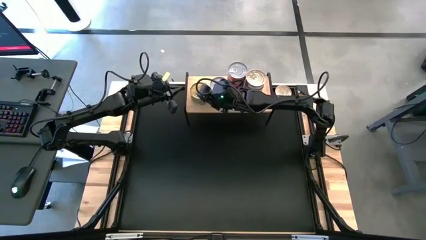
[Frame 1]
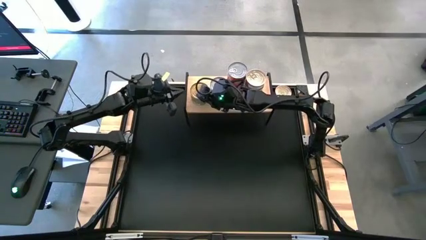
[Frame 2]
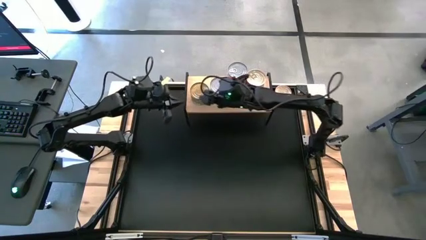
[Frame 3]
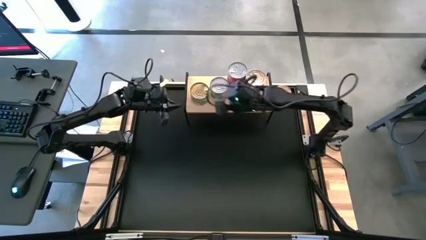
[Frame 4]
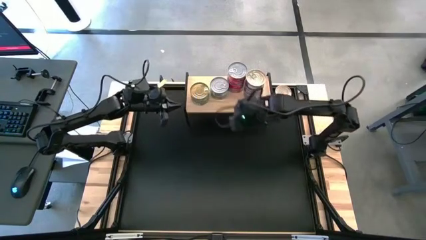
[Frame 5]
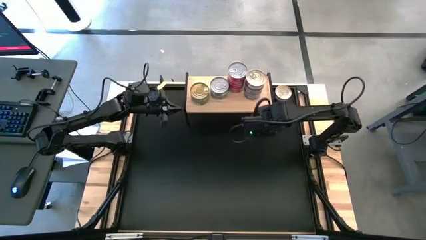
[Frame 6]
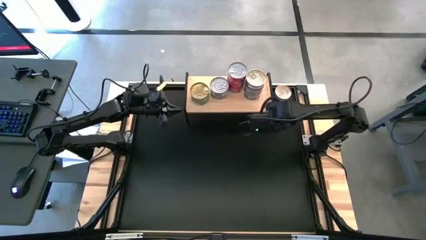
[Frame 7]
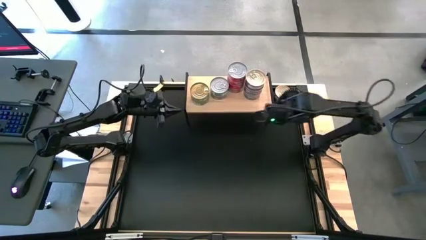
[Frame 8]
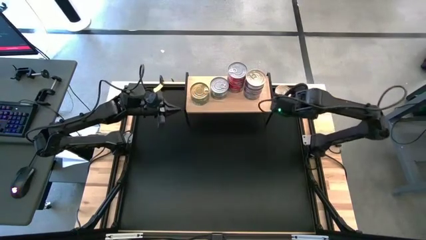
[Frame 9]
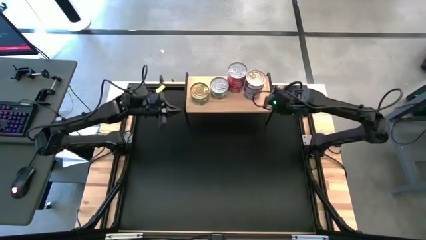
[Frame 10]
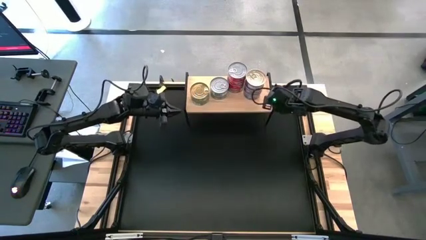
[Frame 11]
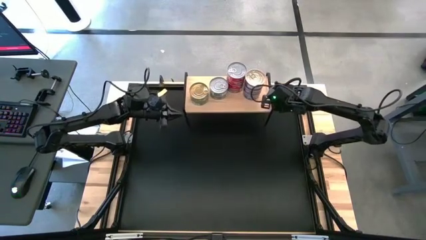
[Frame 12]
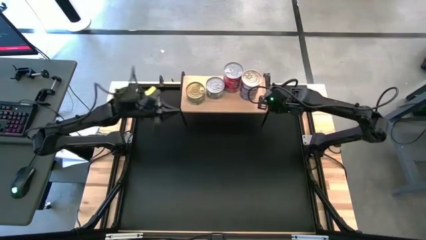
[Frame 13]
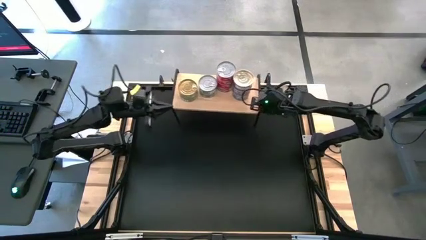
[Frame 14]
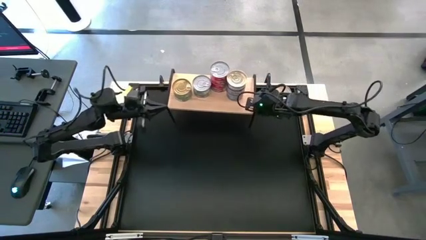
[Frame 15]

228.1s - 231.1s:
Task: Stack canned seafood by type on shelf
Adjust the shelf

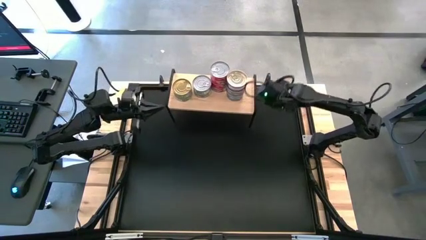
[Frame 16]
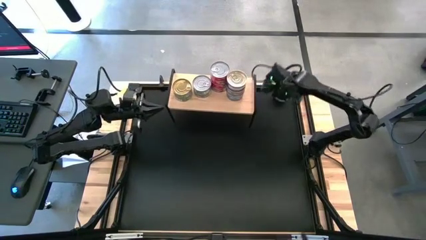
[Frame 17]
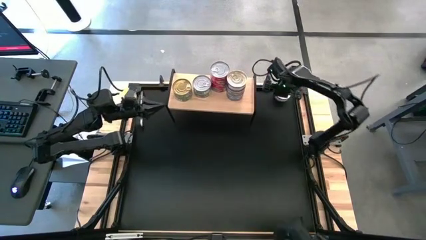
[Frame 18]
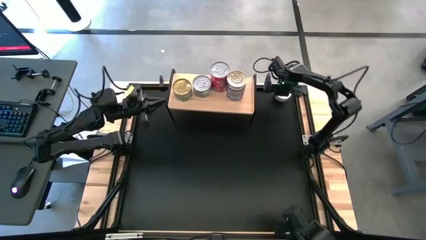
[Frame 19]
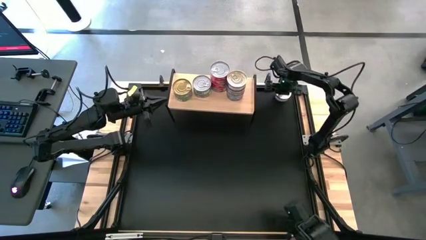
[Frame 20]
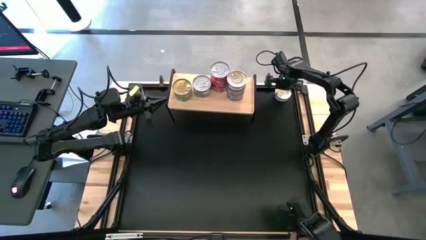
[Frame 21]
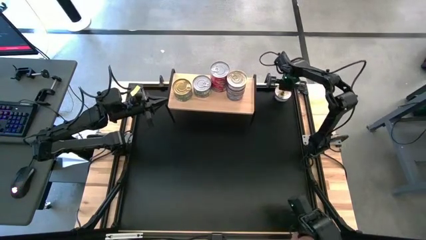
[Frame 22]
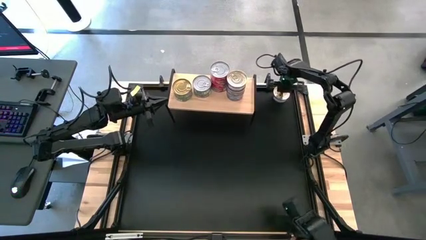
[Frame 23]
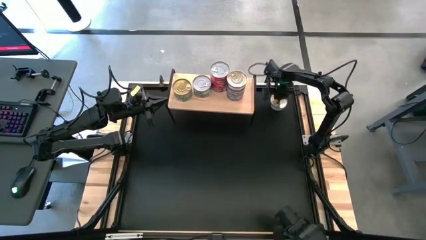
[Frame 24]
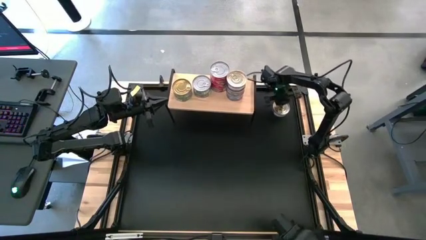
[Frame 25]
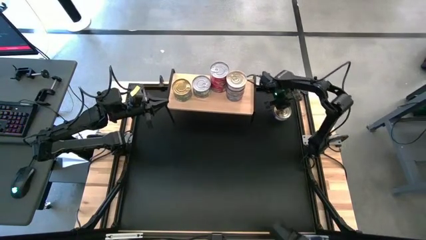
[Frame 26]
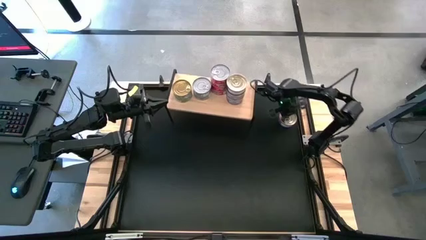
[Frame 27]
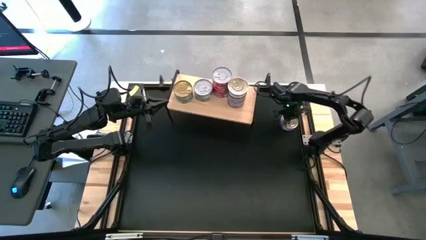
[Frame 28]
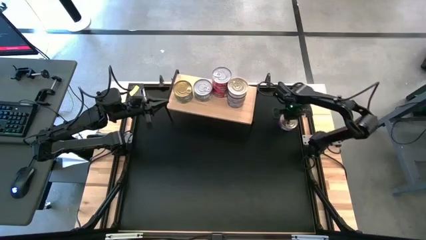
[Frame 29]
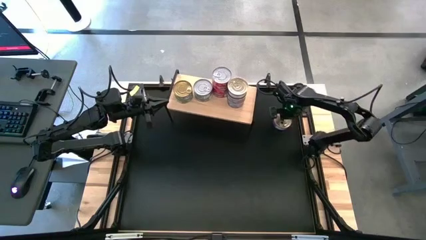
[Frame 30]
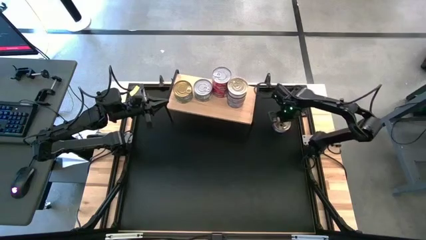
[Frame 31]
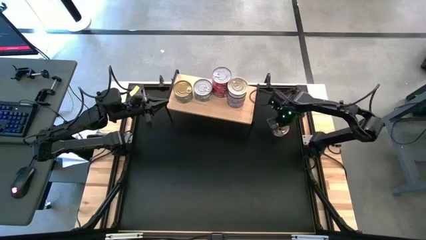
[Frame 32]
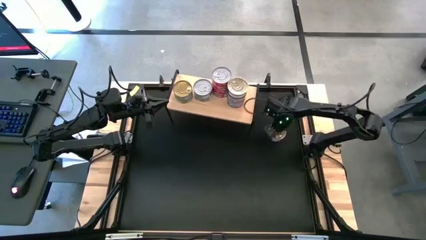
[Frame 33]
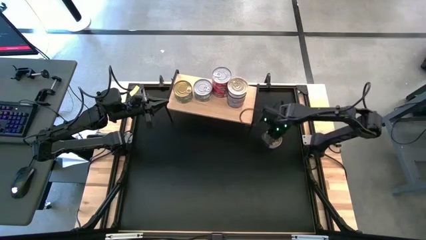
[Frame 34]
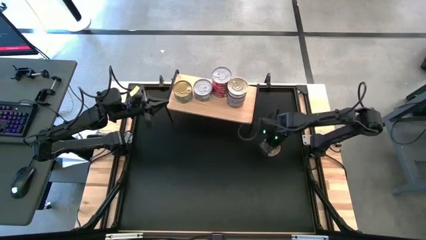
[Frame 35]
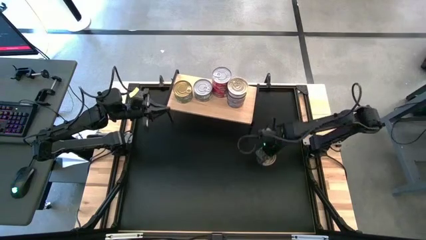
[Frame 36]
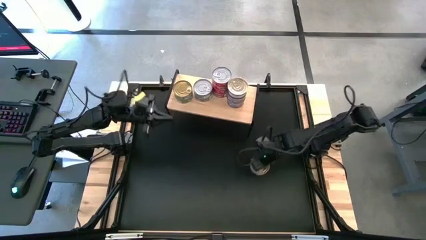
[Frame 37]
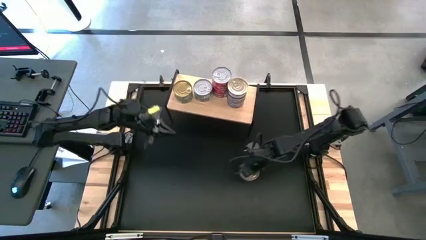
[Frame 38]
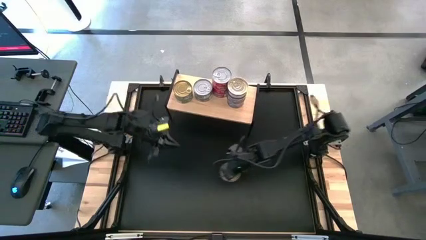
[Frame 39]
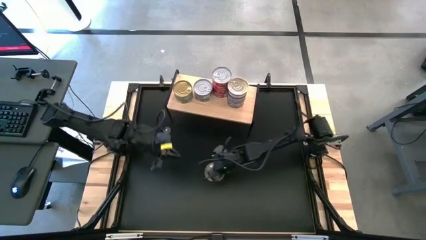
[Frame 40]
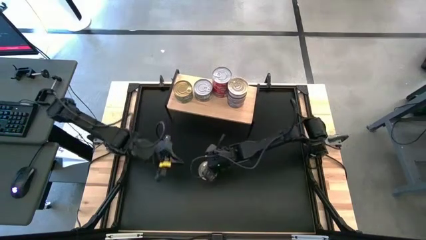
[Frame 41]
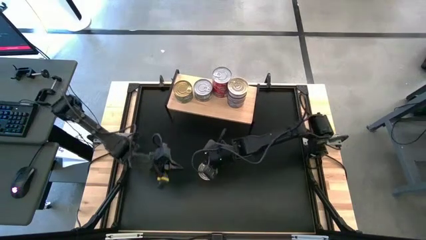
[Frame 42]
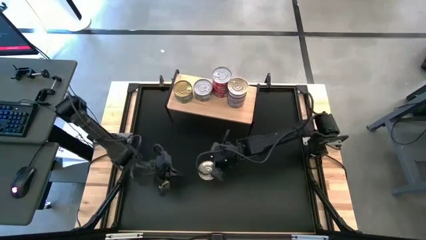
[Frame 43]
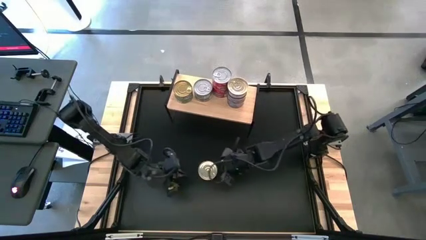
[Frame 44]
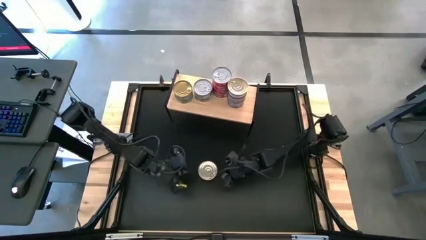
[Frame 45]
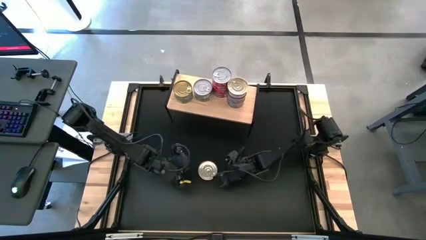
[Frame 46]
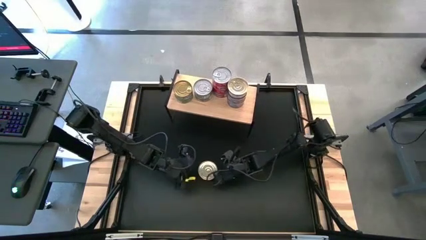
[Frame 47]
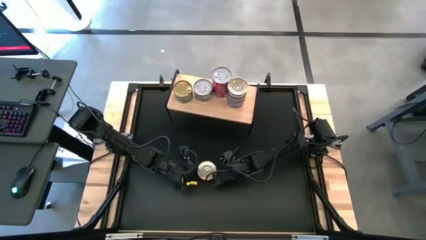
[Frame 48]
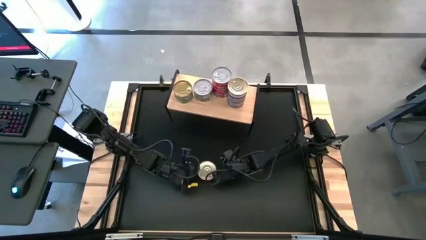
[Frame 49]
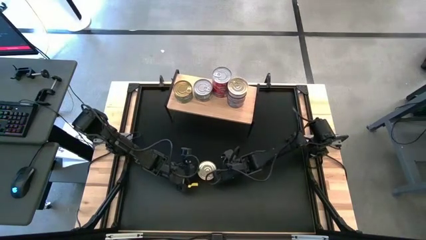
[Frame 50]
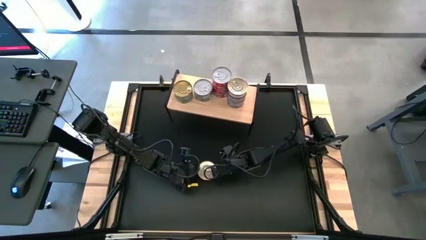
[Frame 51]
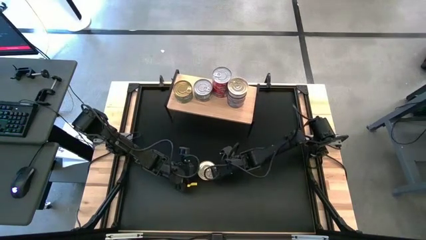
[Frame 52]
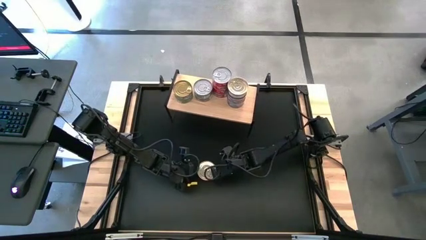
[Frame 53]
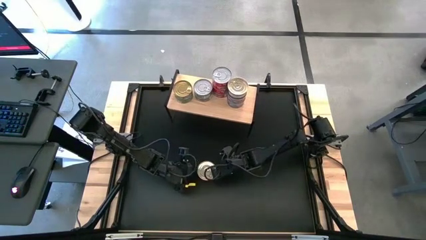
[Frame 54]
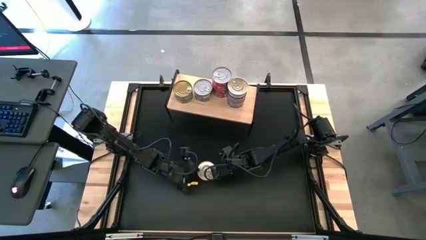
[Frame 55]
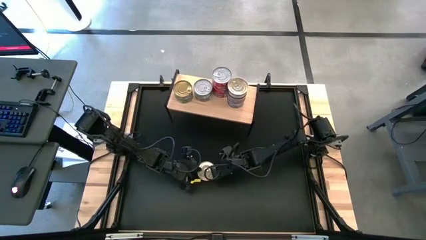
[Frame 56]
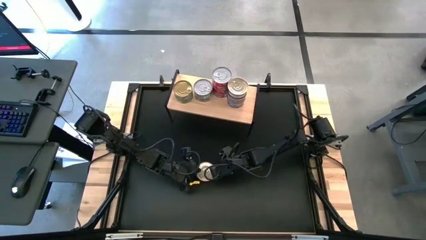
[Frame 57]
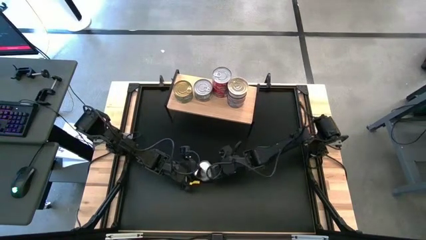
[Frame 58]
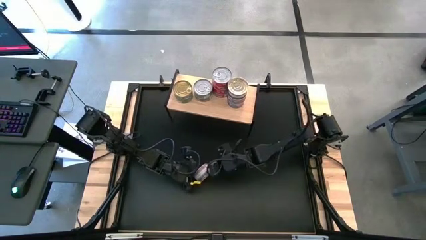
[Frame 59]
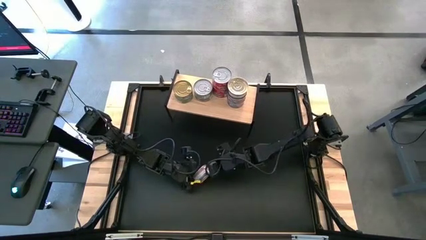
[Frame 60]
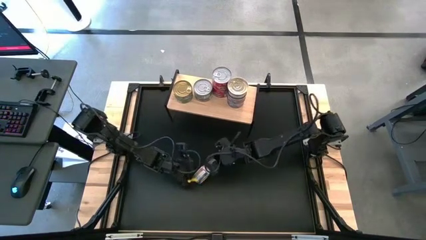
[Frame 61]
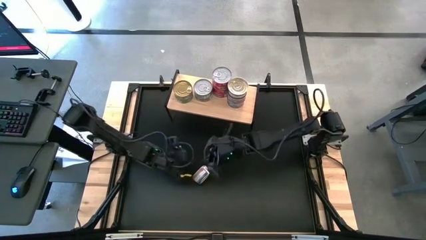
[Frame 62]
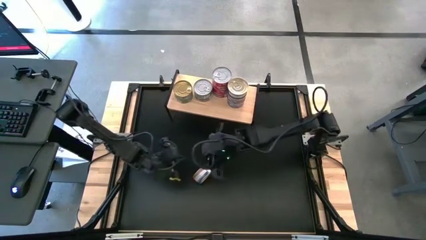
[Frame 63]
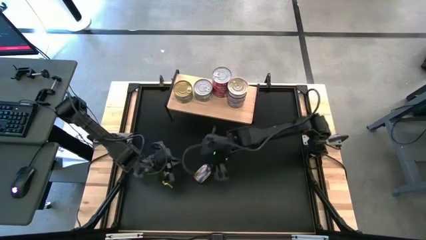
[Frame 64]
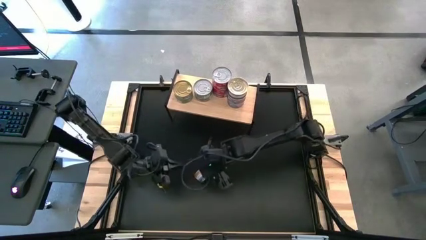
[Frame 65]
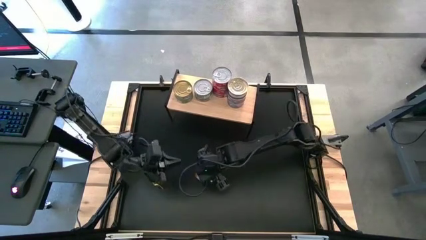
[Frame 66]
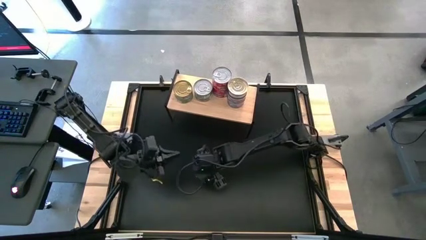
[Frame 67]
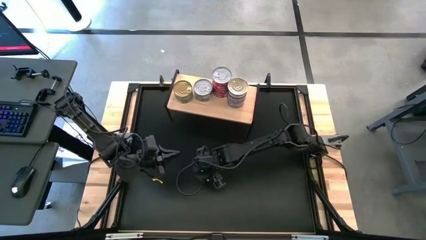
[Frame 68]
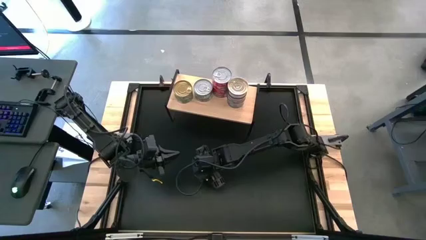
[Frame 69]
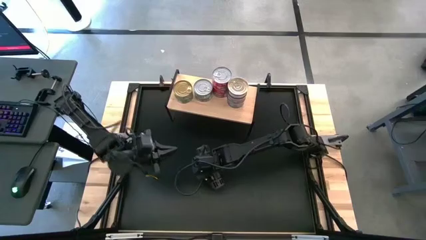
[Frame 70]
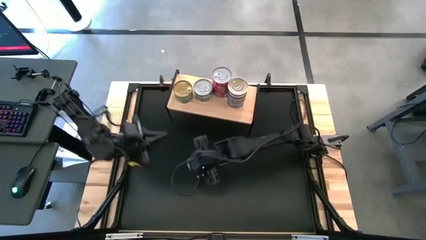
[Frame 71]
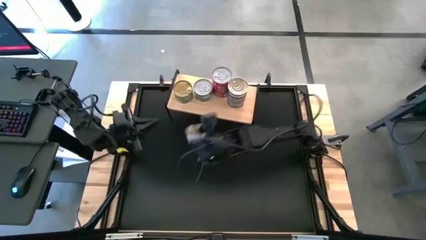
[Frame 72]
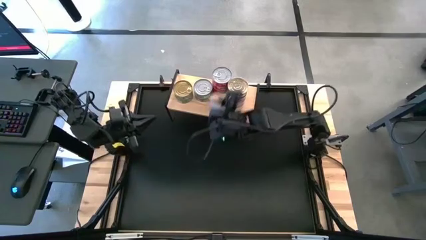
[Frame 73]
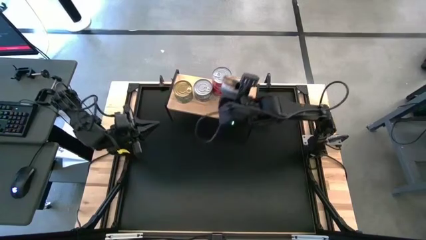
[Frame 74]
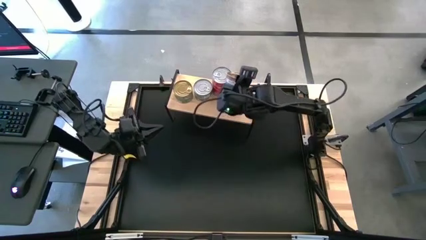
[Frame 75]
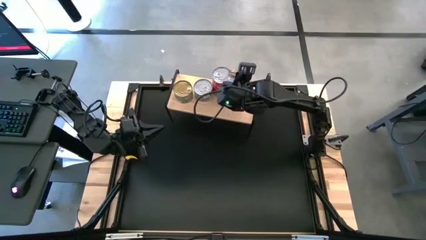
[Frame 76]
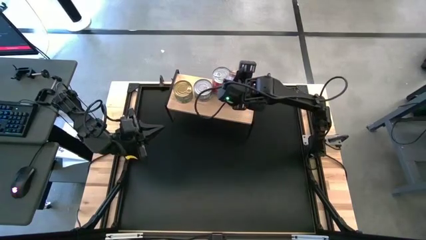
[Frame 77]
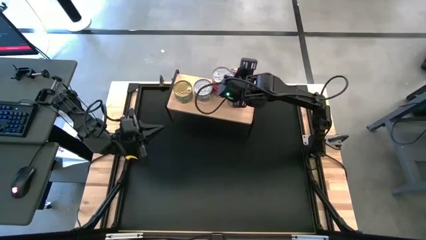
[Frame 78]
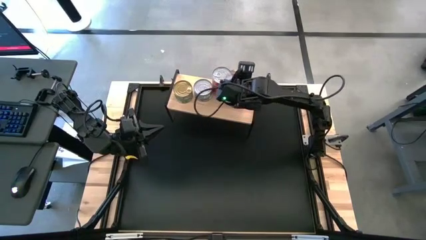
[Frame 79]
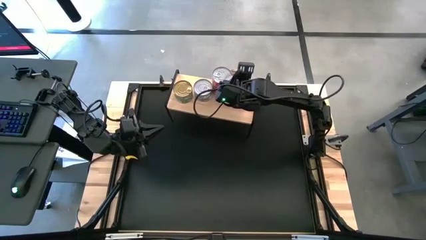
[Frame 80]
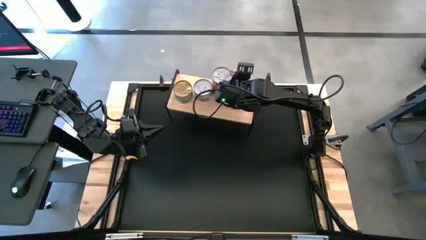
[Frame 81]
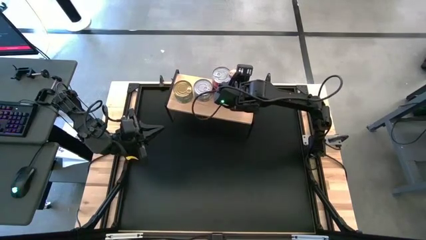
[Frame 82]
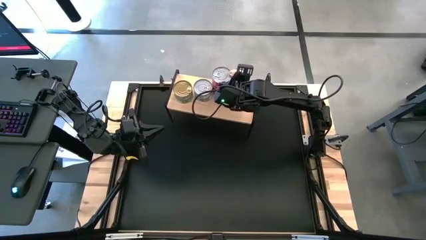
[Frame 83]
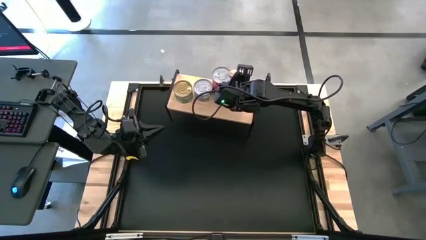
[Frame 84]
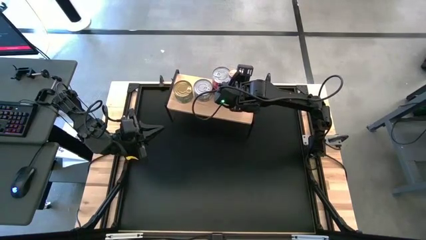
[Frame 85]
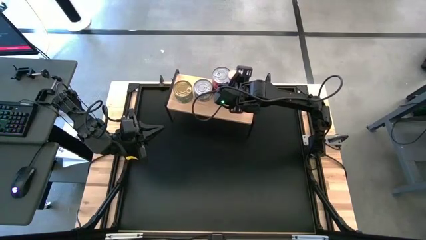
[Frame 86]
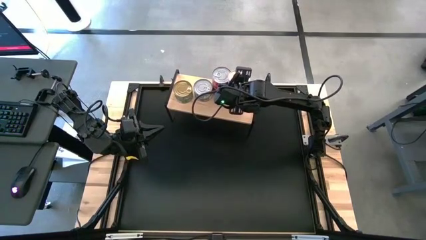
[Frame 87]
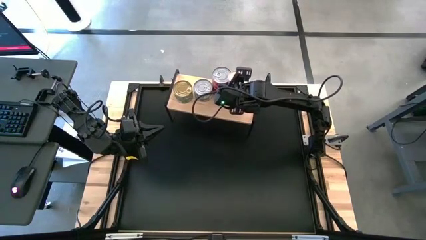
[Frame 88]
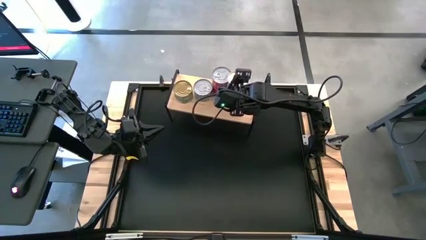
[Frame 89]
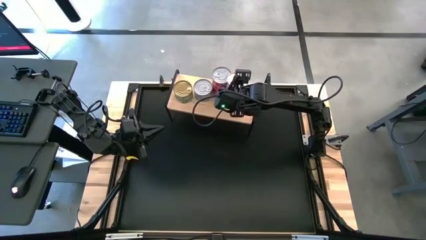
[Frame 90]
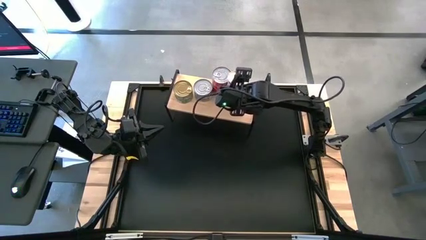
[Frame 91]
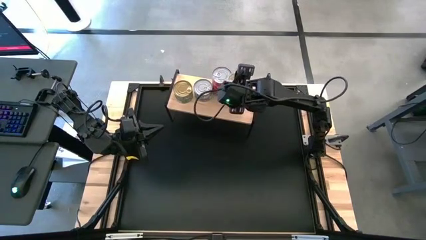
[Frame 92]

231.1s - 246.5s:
Stack the blue tuna can on top of the blue tuna can on the shelf
